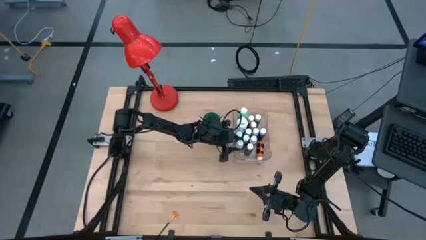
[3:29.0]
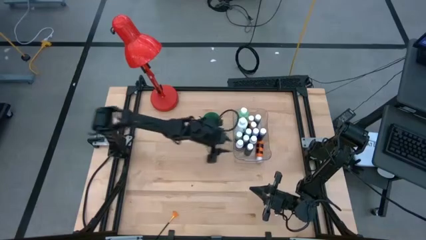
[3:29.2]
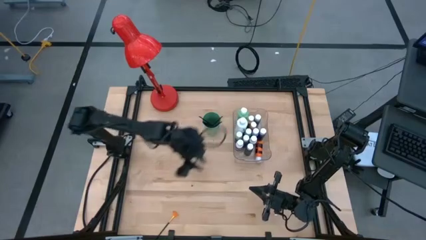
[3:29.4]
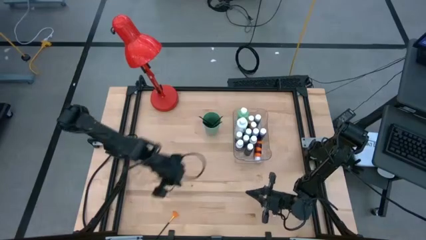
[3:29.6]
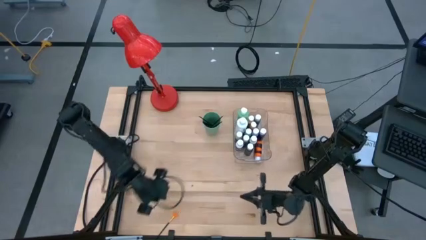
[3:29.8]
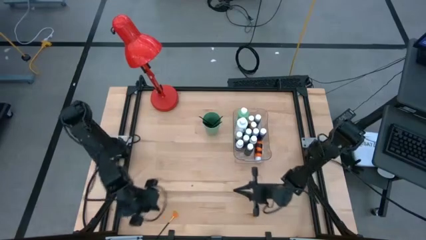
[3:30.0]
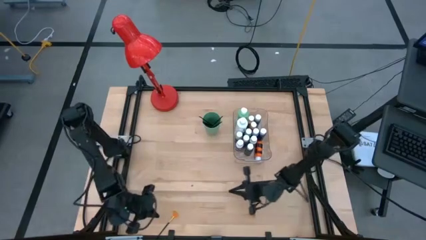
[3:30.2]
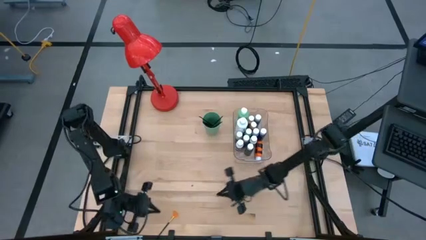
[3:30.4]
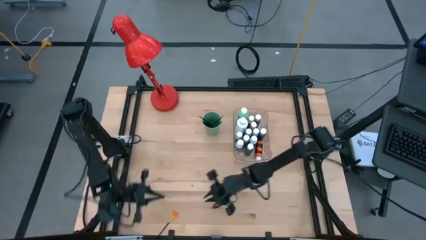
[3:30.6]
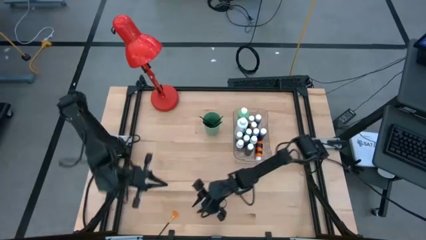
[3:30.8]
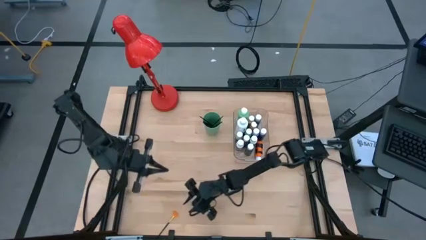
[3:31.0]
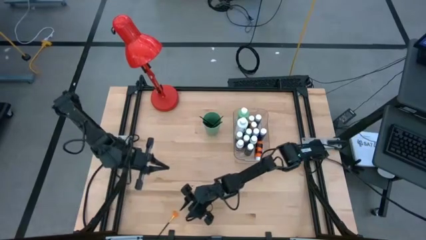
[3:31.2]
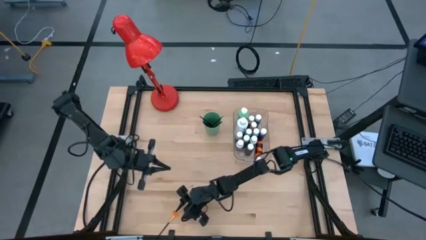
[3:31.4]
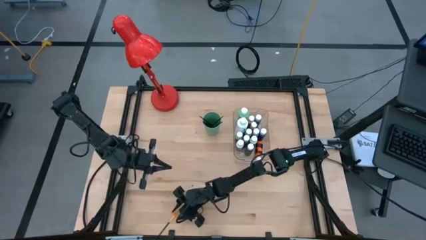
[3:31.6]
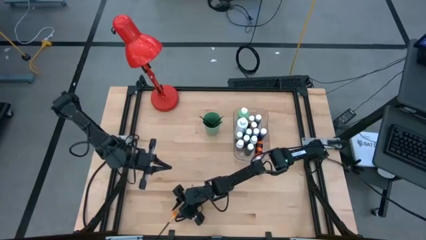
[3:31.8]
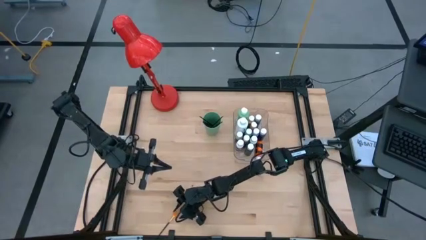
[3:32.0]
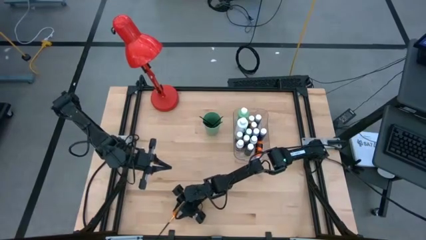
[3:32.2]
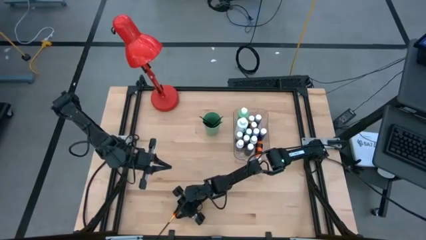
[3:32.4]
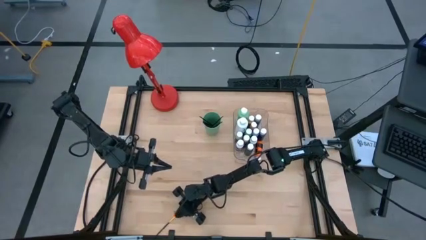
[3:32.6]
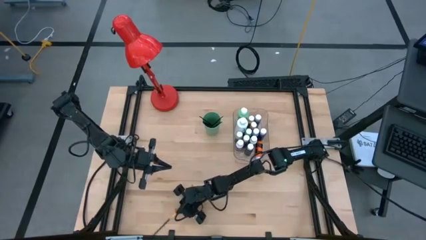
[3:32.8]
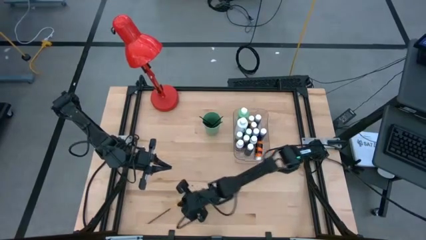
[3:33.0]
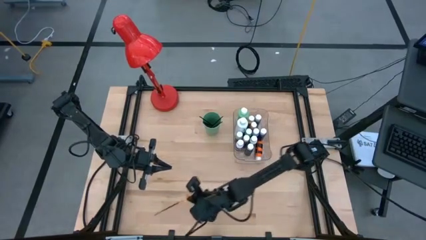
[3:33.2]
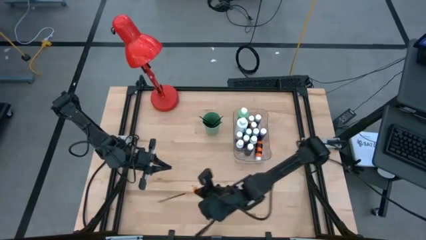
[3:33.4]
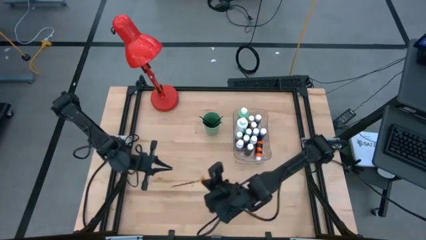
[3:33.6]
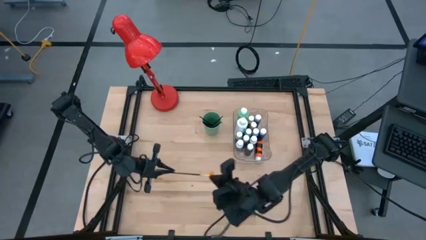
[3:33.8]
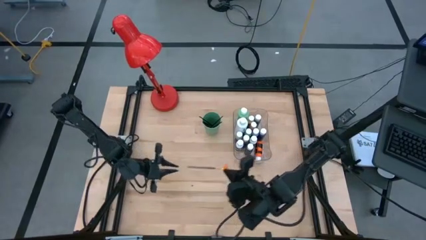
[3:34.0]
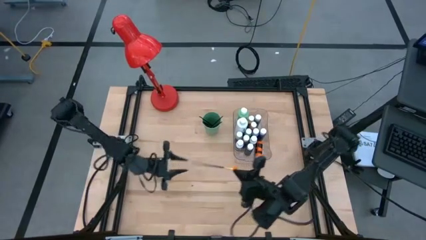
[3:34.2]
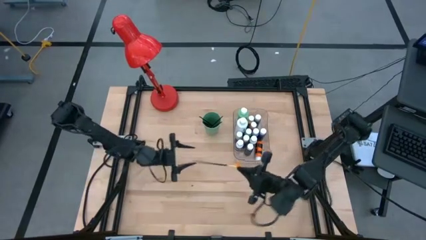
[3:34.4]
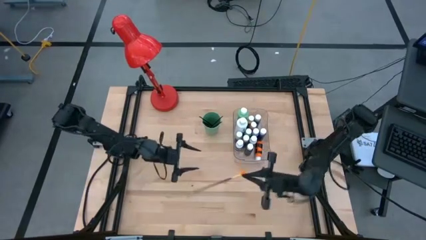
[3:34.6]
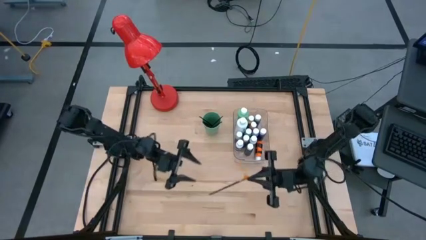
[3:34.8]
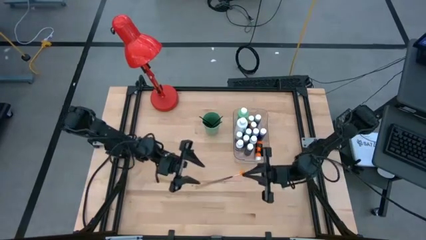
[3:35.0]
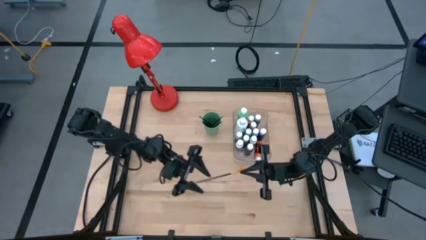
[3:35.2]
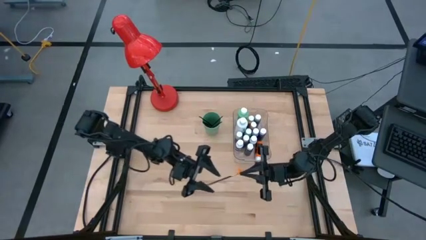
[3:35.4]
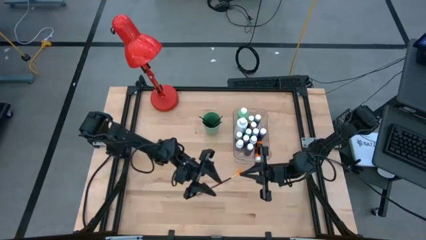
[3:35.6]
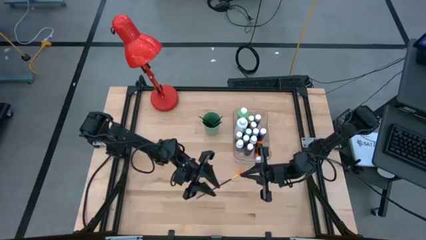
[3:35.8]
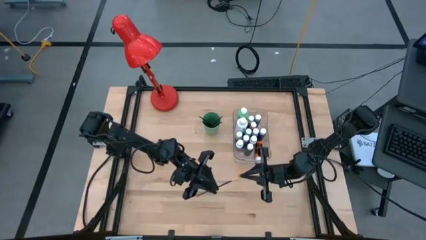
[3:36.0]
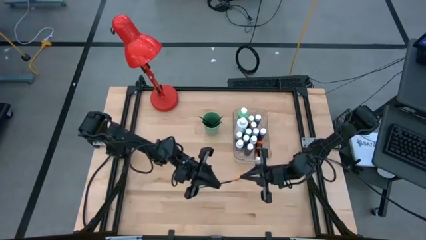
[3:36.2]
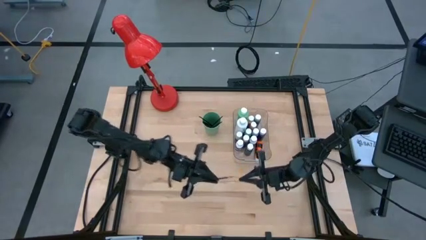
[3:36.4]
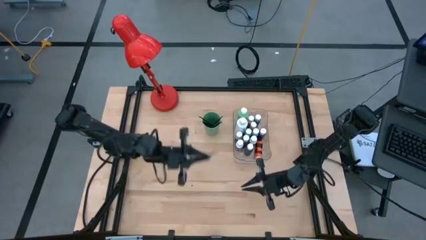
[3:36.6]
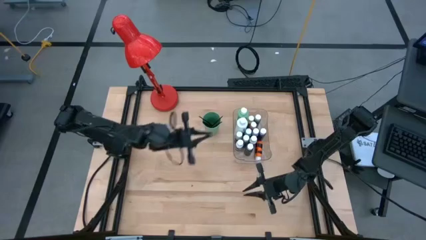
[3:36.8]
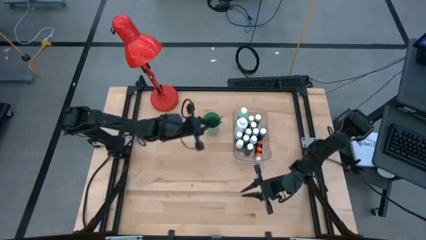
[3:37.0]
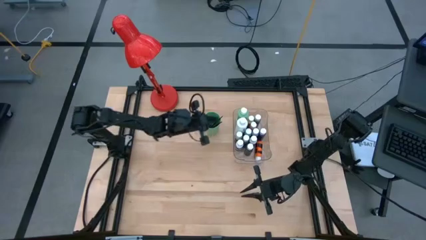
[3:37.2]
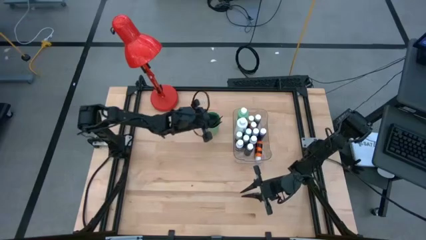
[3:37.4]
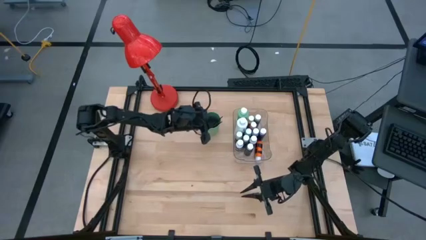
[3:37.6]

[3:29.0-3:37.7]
Task: Pick & Place Paint Supplies
Put the orange paint brush into the green cup
